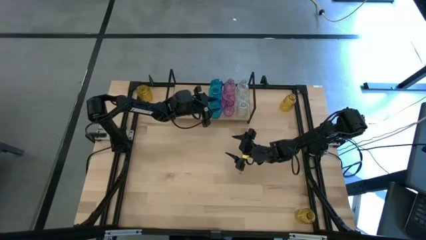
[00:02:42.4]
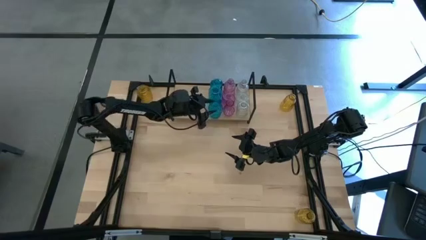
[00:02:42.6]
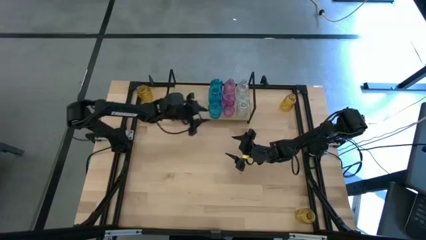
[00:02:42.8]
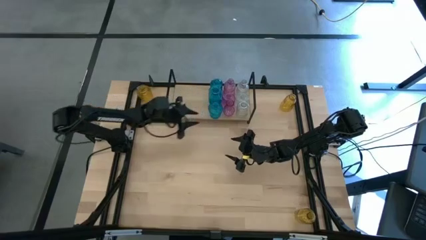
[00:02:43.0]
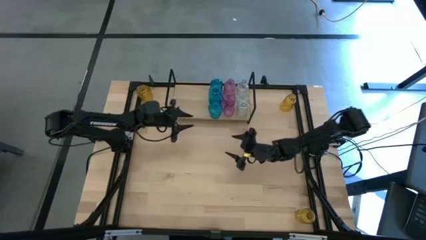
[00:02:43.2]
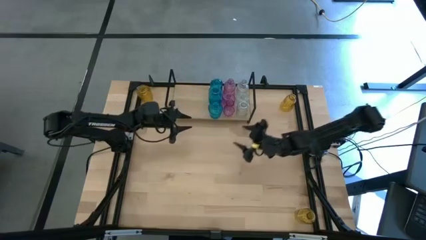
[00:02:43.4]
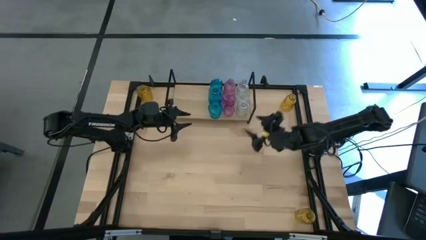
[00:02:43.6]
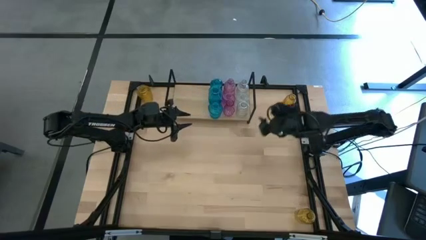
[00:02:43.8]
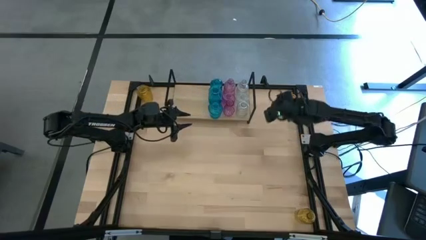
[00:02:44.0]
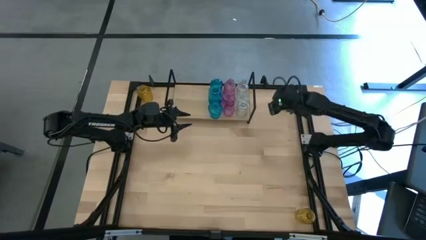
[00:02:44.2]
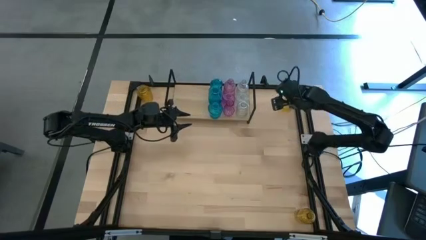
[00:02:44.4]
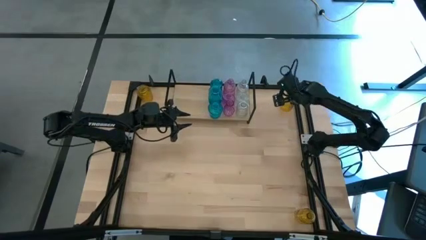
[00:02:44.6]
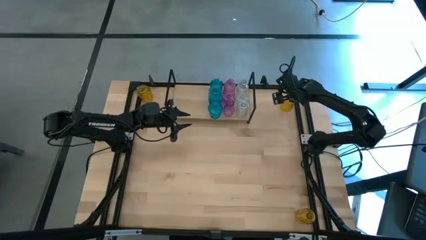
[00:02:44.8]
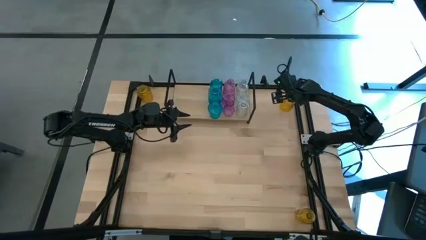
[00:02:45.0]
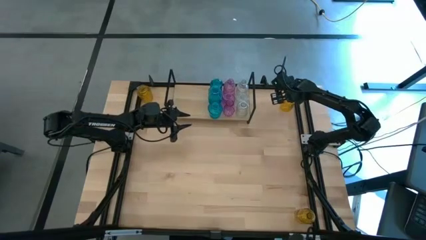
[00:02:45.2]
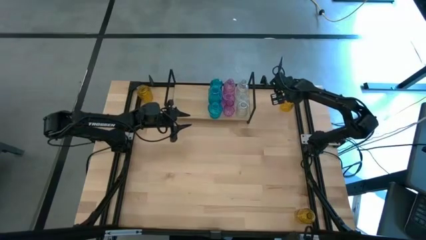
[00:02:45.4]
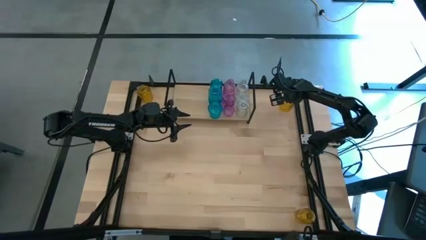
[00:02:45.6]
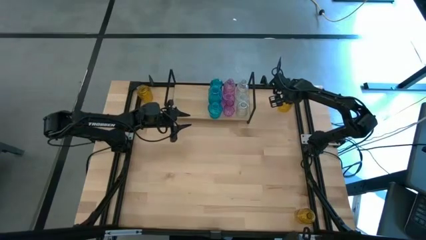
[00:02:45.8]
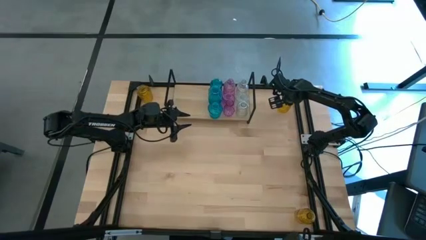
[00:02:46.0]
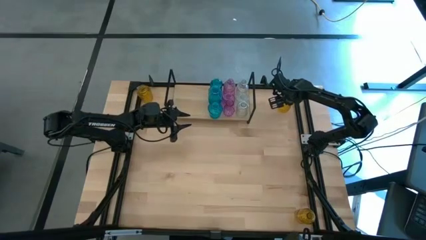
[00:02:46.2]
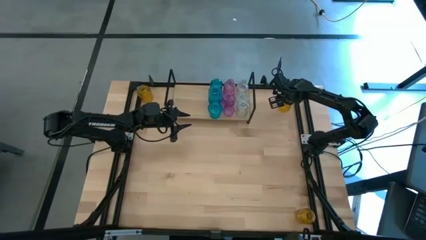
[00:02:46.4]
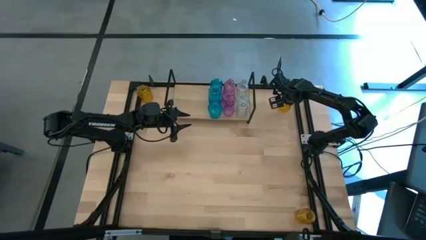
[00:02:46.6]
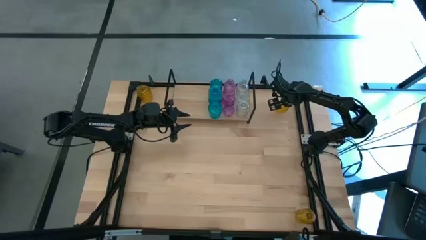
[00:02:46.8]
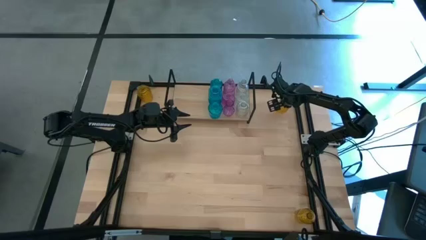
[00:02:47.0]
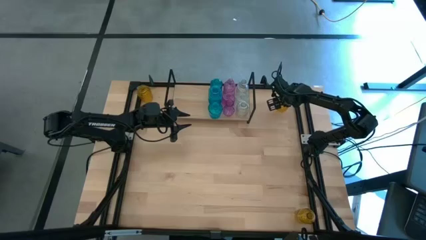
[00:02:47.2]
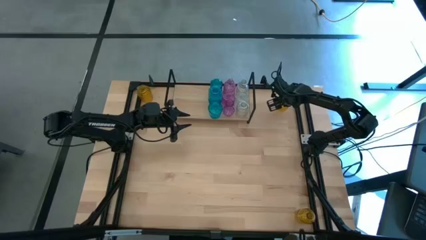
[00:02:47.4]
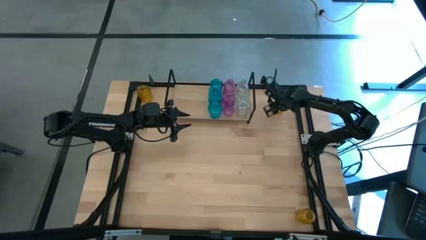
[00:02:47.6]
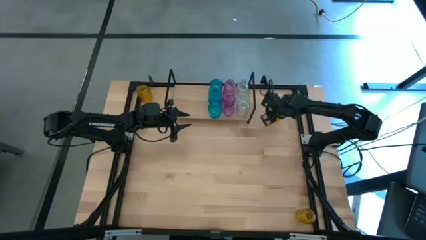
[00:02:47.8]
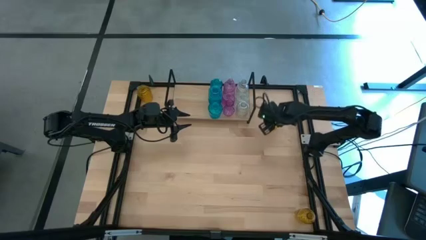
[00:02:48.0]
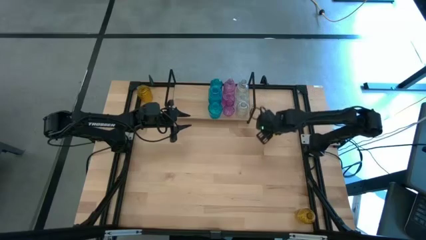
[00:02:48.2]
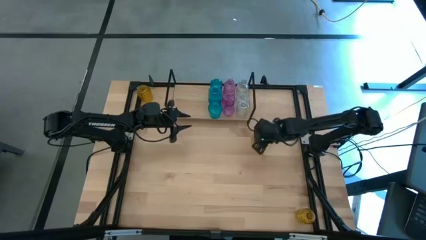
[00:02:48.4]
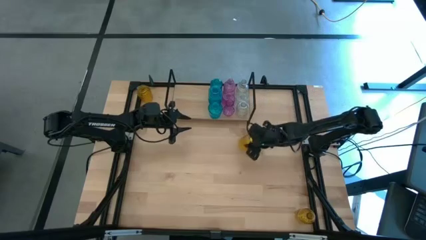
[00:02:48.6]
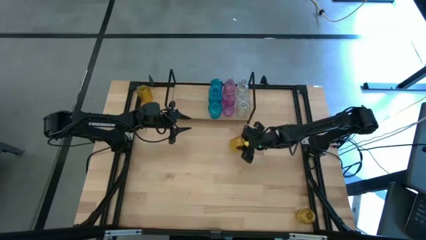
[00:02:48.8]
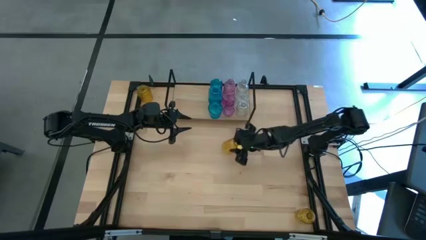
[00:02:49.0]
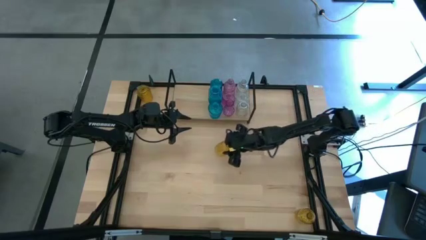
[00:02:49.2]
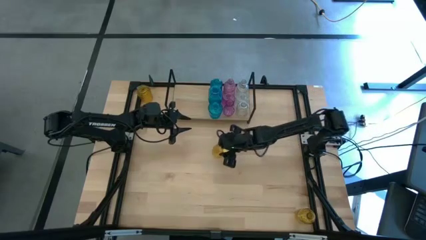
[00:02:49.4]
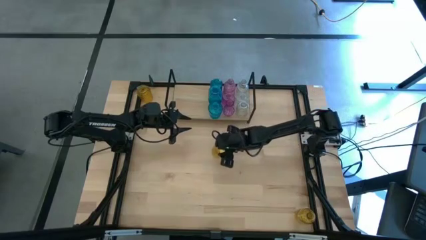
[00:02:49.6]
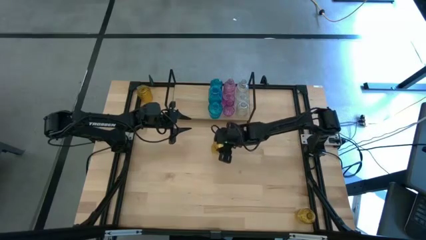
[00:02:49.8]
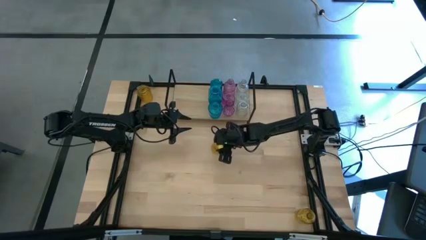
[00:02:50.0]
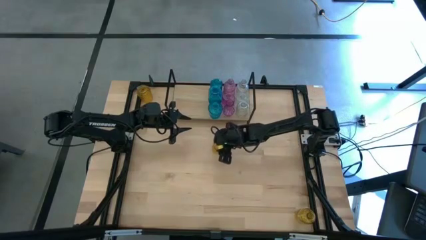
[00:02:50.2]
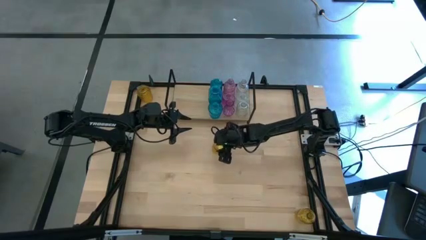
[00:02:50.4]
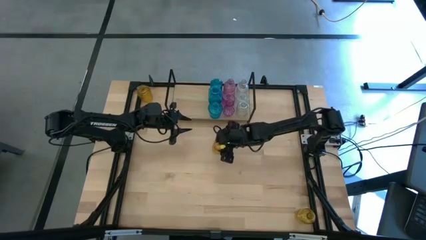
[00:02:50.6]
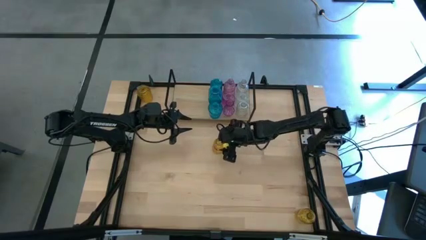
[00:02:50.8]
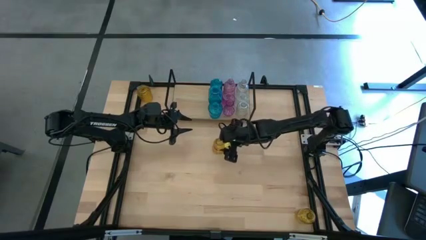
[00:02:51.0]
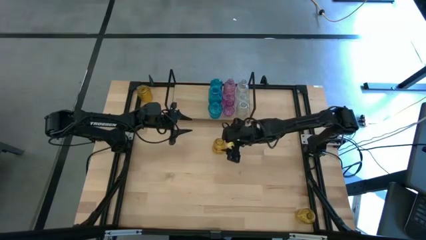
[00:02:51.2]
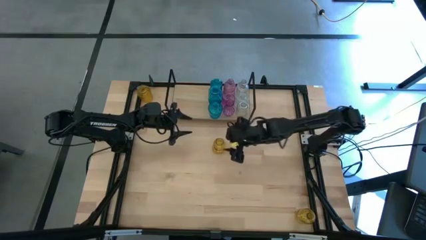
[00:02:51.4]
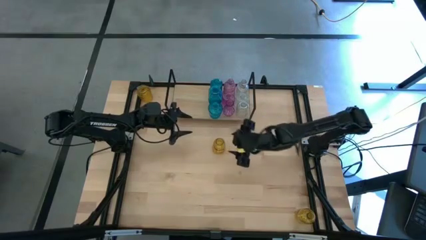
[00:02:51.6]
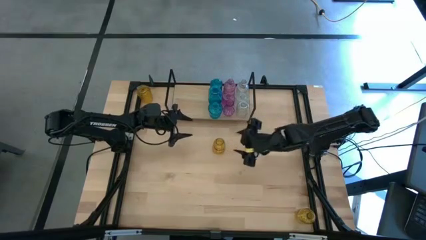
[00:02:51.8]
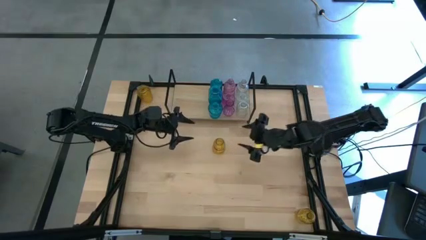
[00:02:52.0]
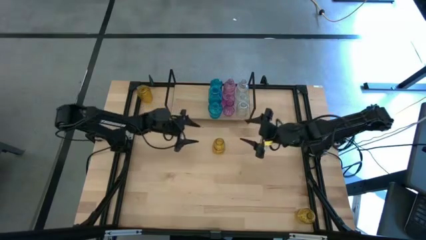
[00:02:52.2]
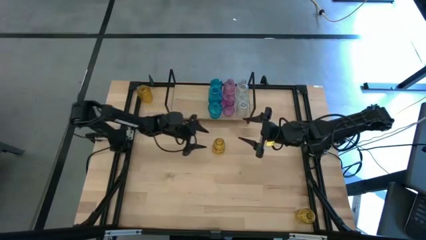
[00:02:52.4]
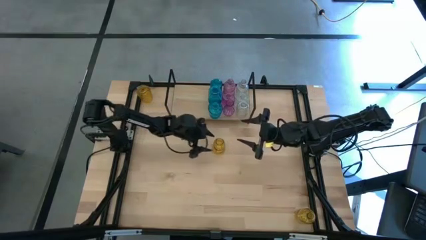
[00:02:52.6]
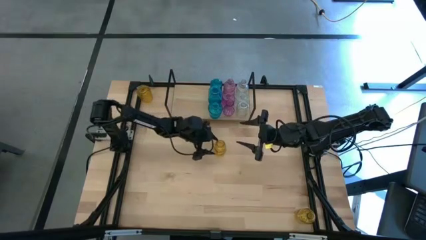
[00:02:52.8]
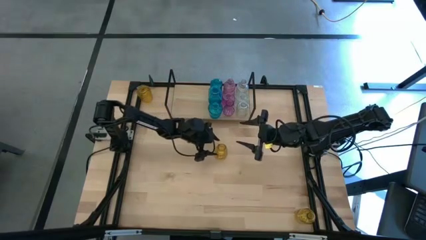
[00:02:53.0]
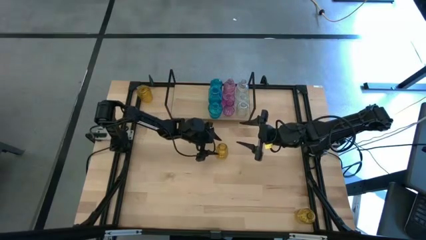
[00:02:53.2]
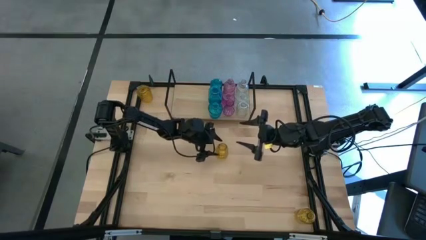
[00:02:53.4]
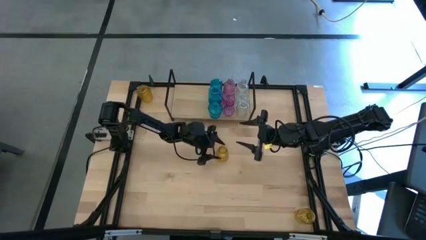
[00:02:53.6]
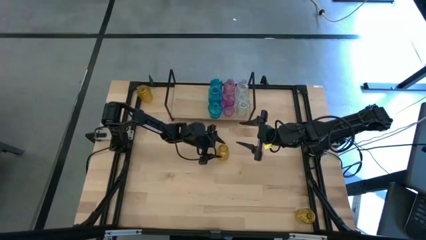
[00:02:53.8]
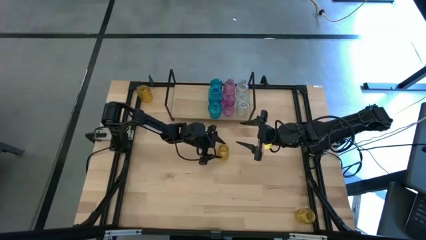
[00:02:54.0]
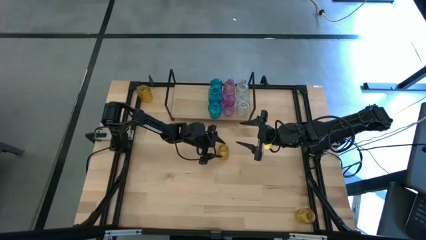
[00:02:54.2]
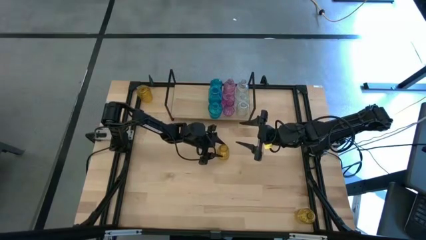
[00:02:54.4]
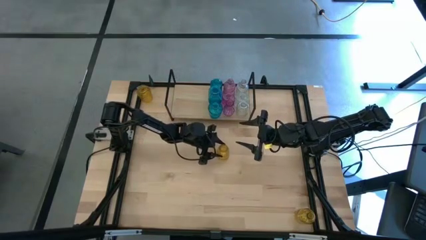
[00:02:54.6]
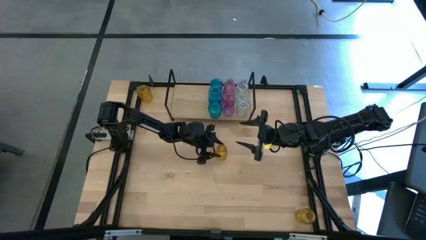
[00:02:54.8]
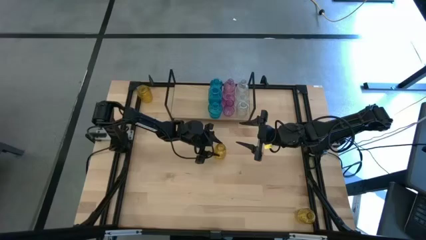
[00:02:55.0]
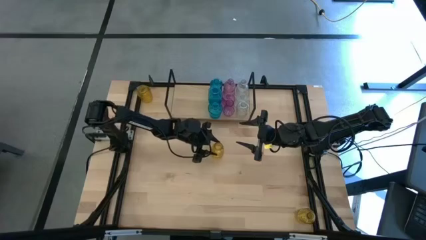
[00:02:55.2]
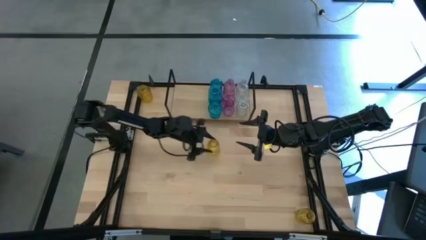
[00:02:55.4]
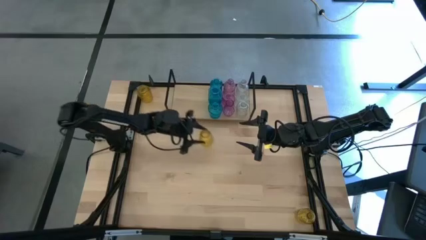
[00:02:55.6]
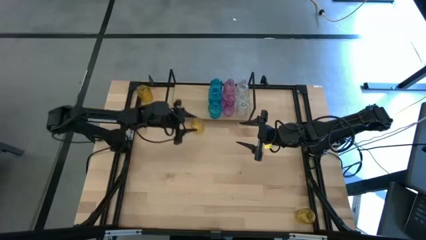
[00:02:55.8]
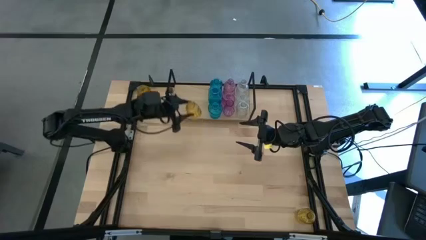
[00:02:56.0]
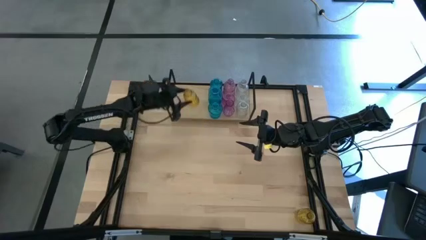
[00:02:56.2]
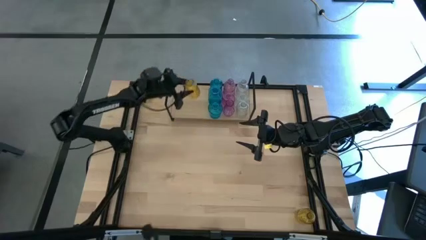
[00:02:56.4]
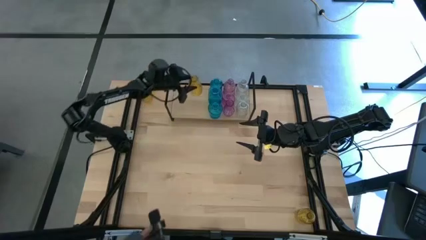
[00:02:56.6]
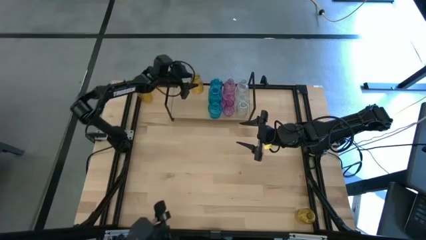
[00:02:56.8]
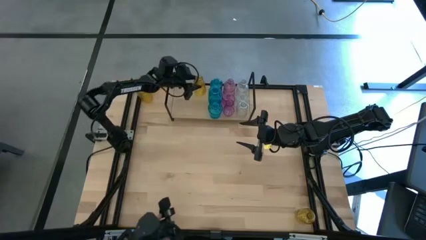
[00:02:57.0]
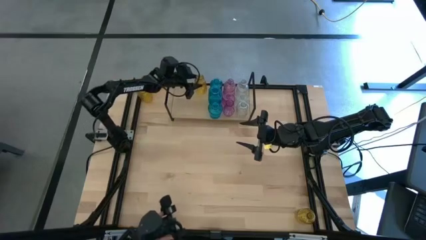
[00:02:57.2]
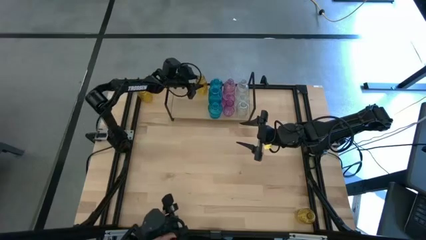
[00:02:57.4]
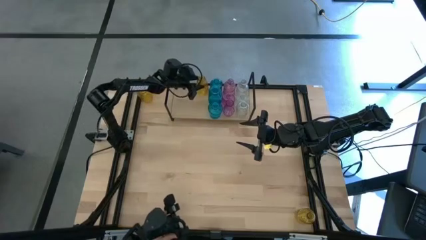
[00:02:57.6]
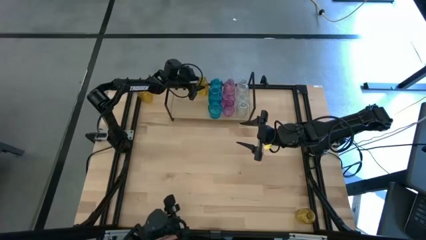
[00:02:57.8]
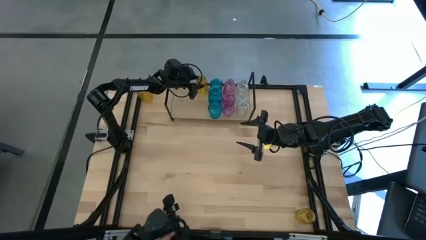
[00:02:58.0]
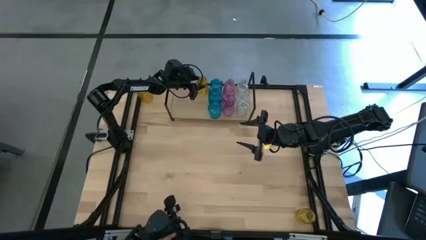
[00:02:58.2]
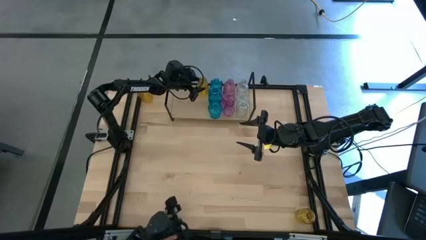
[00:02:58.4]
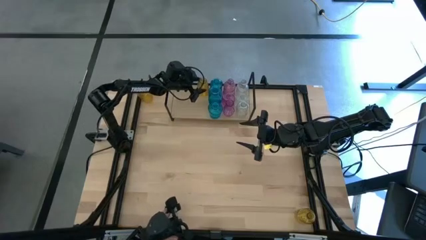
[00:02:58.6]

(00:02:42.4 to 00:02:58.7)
Task: sort vases onto shelf
Put the top right yellow vase on the shelf
